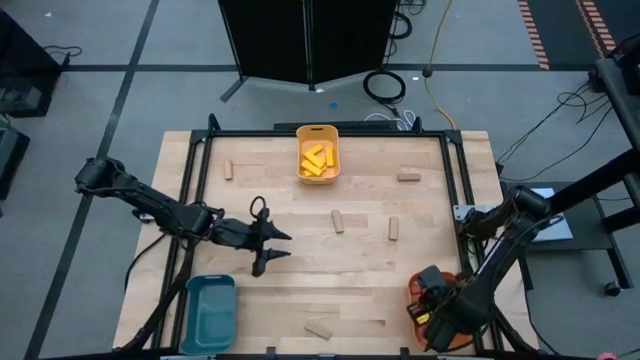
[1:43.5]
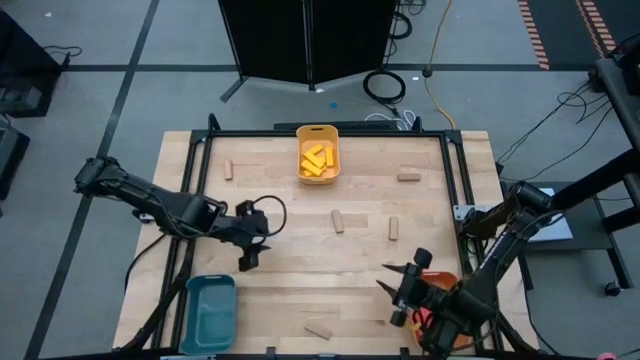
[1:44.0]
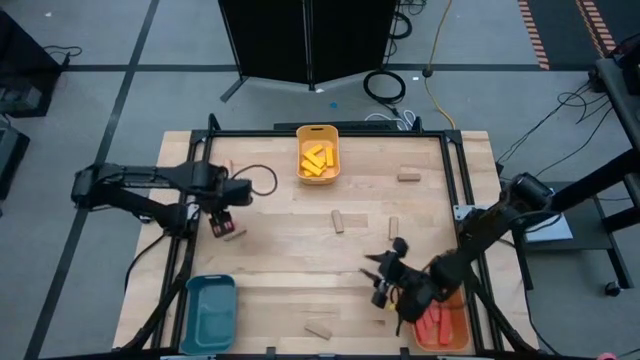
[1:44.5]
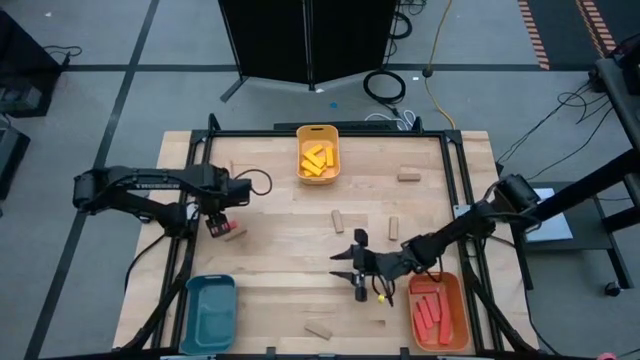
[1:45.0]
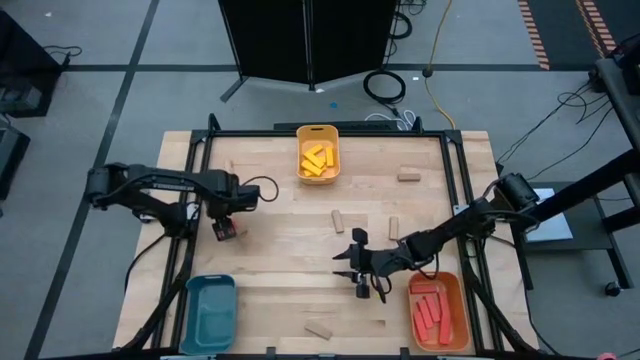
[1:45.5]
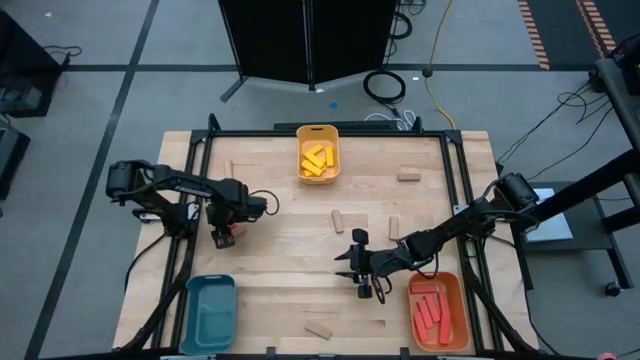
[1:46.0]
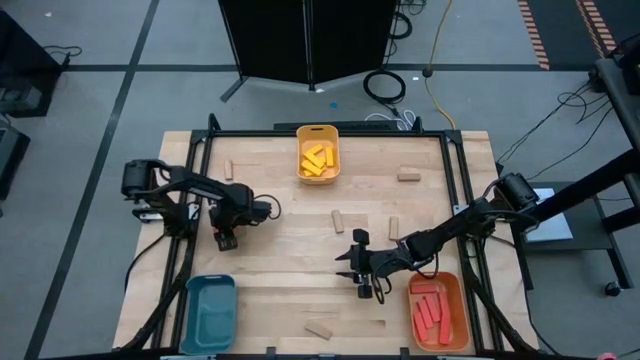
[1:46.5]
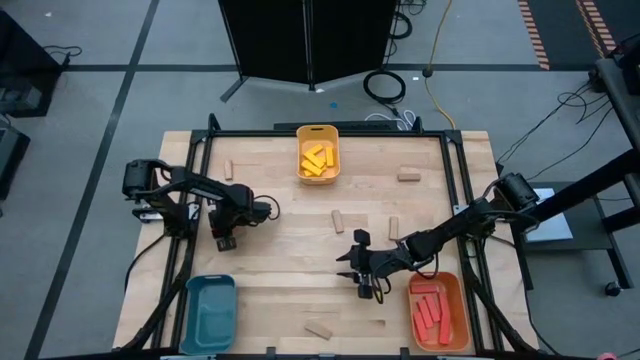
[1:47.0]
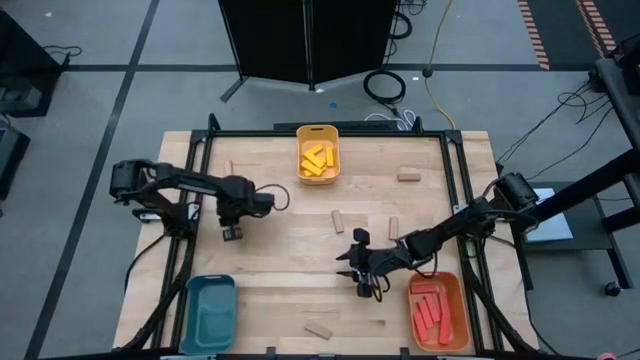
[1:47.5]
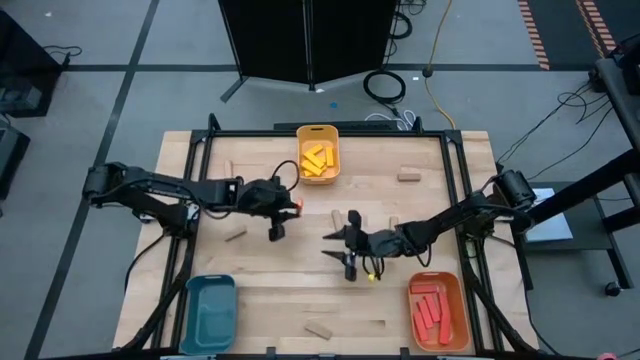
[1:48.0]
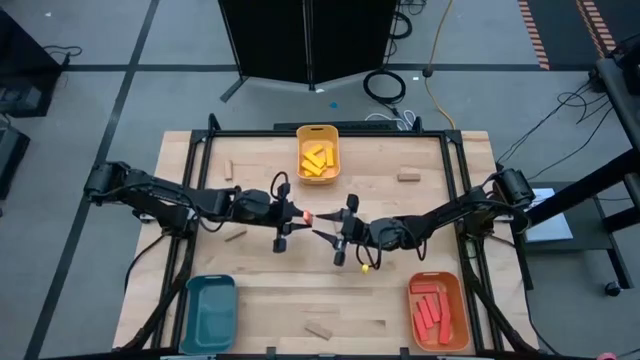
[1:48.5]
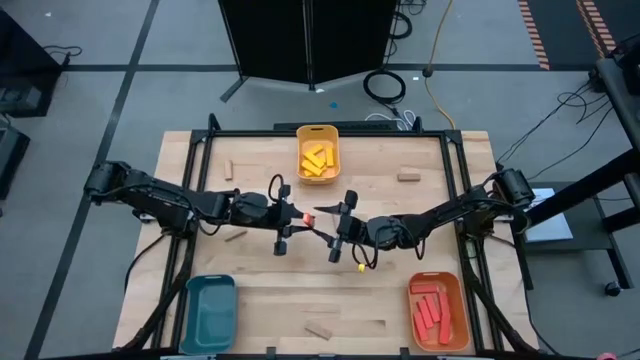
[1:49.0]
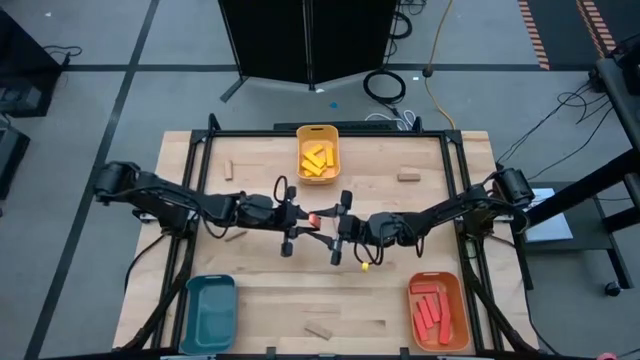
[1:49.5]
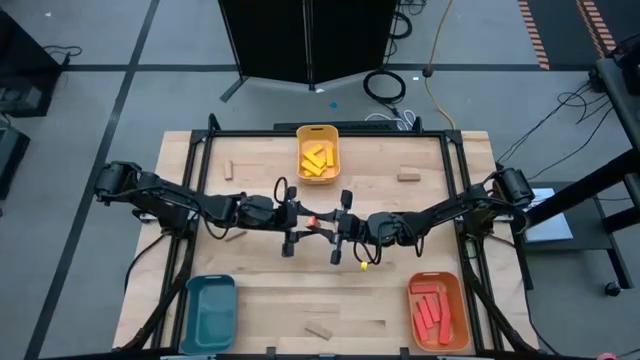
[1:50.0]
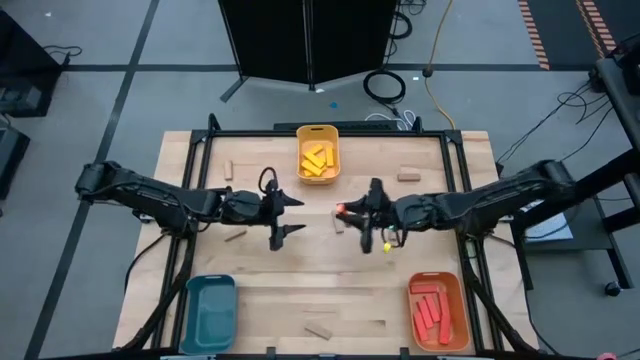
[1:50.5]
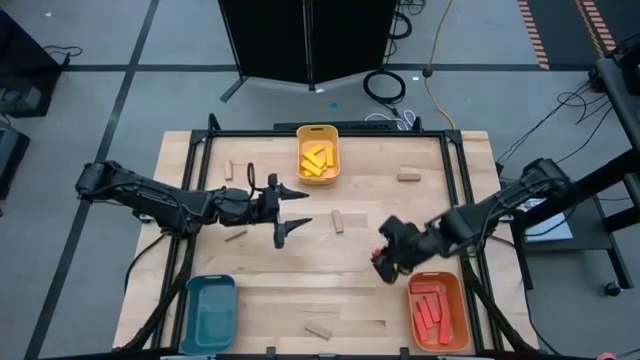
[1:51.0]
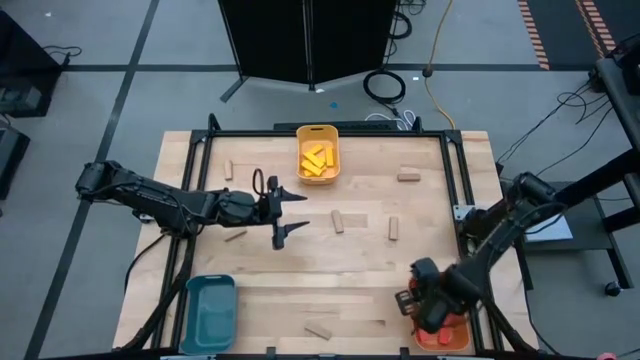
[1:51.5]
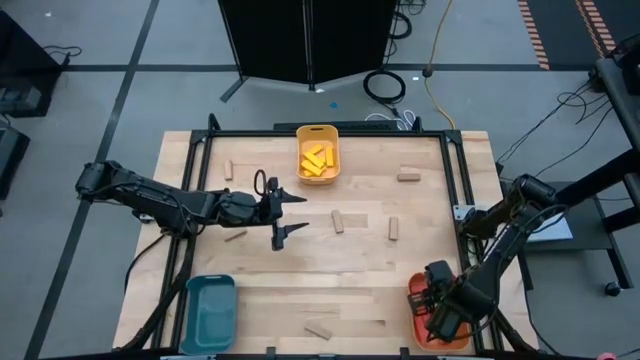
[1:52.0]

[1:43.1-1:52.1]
Task: Sort blocks
Put the orange block into the orange bin

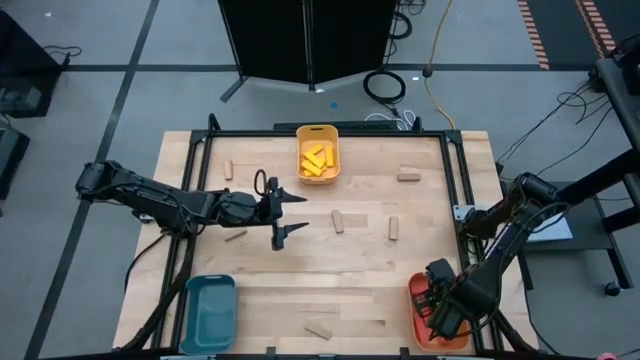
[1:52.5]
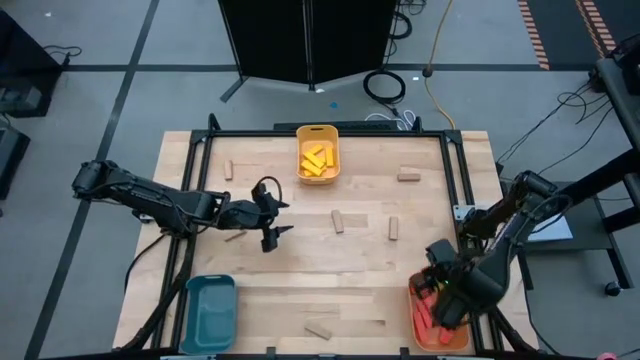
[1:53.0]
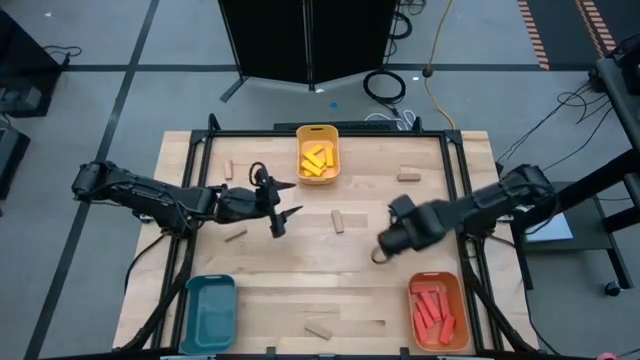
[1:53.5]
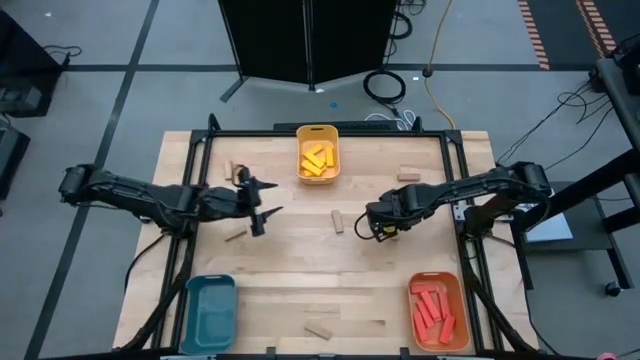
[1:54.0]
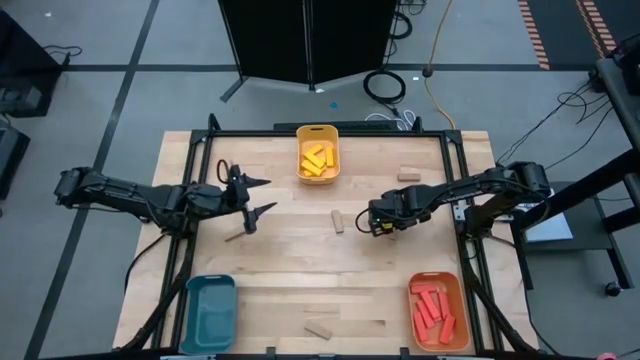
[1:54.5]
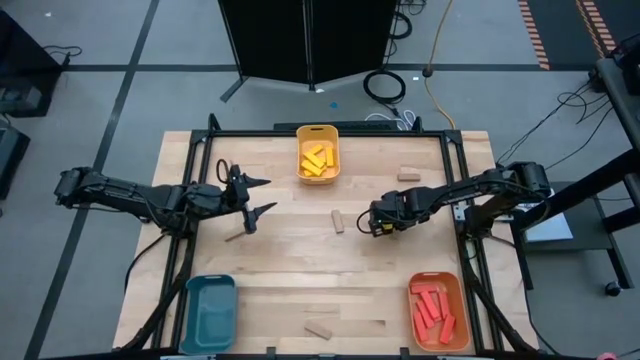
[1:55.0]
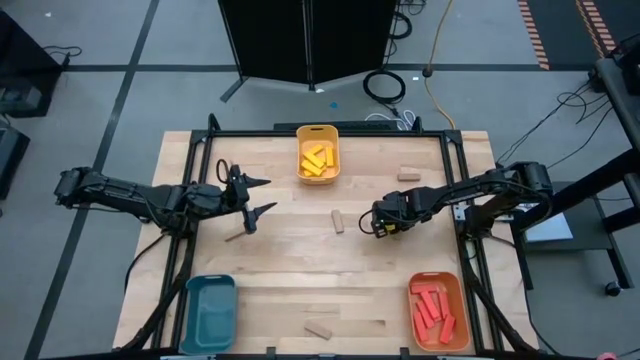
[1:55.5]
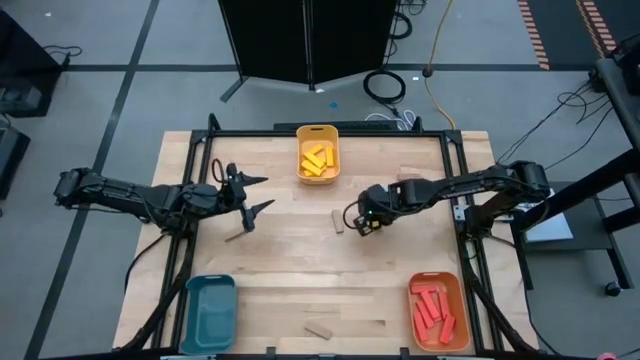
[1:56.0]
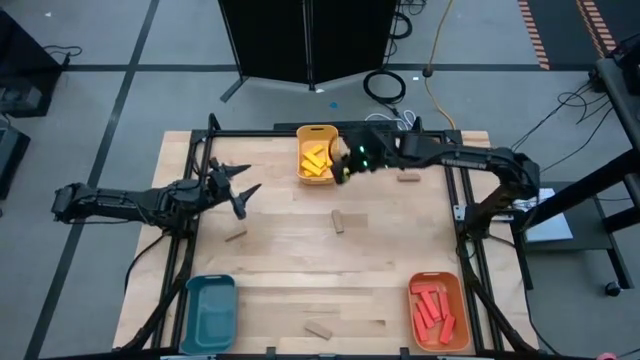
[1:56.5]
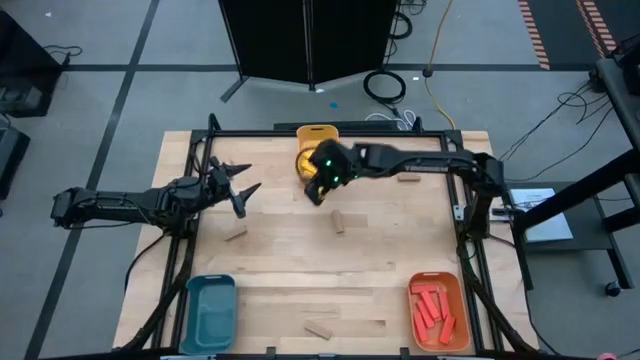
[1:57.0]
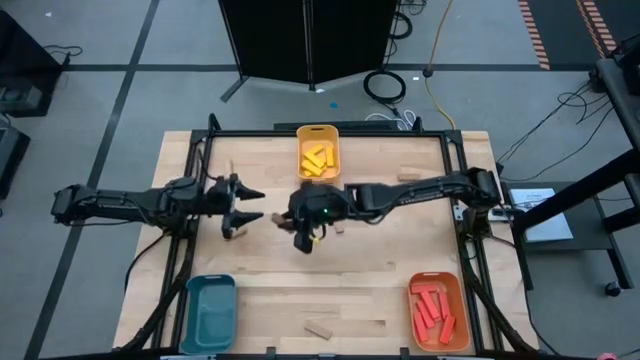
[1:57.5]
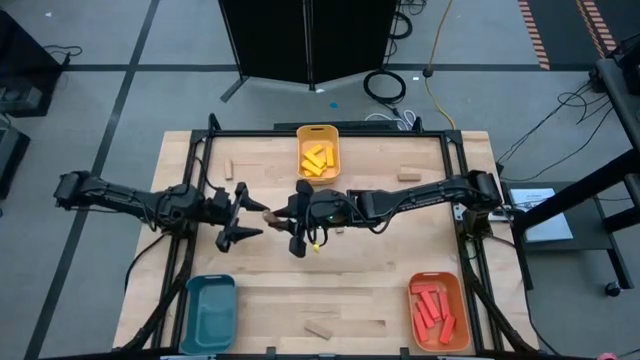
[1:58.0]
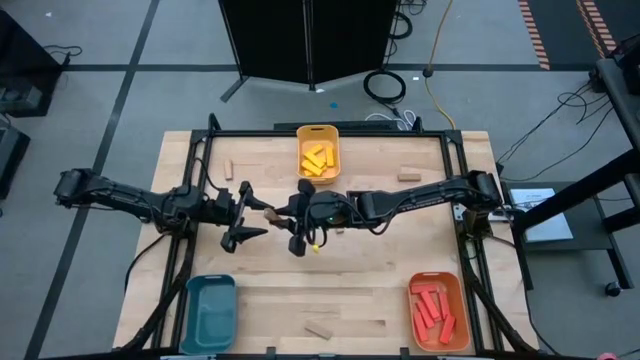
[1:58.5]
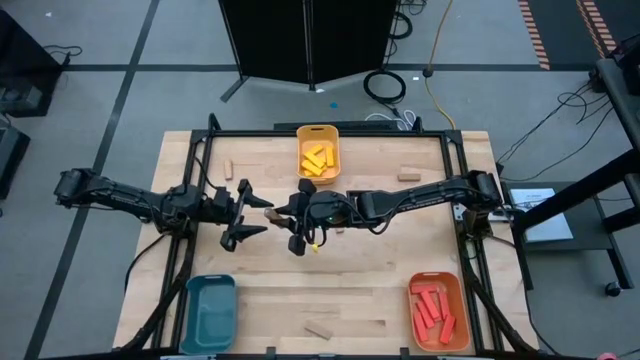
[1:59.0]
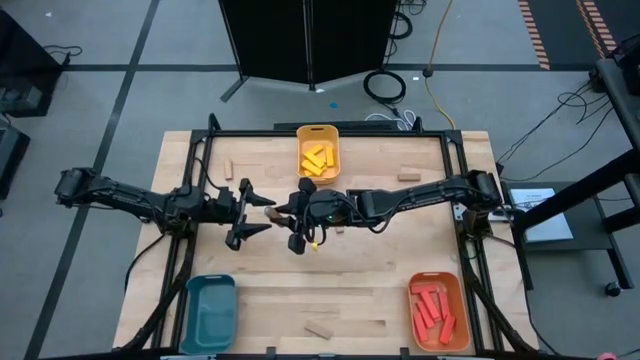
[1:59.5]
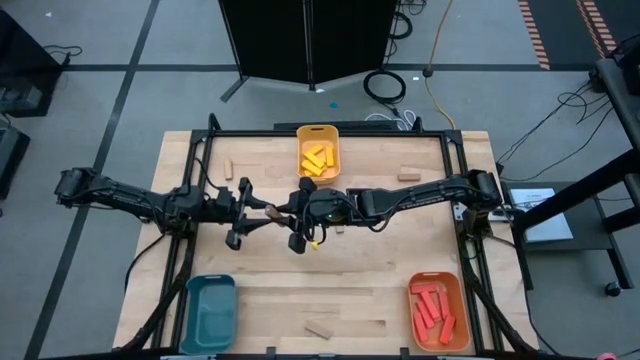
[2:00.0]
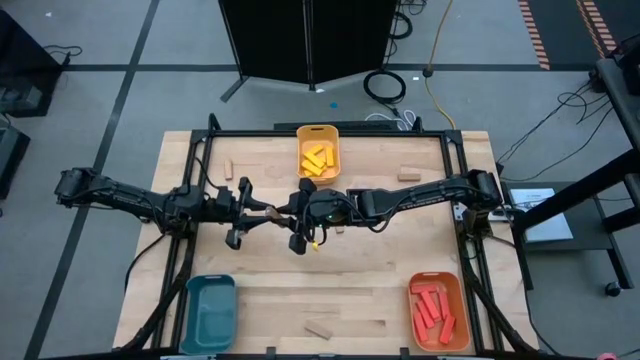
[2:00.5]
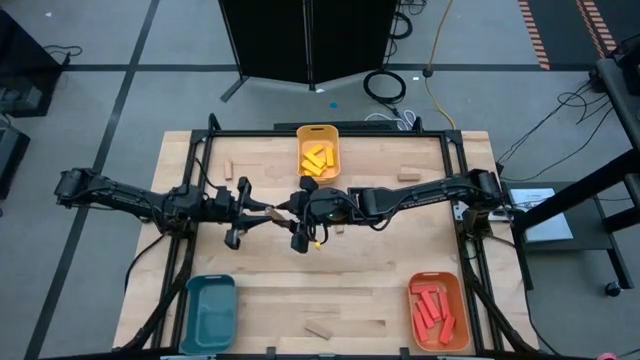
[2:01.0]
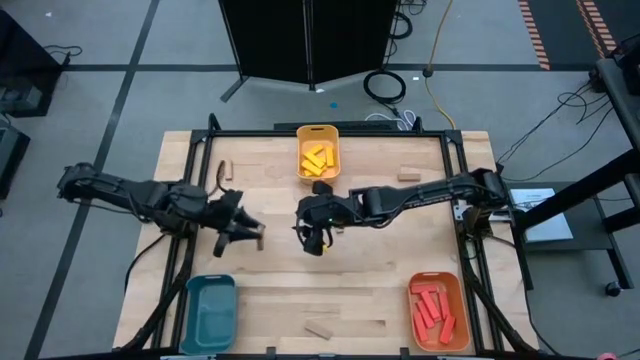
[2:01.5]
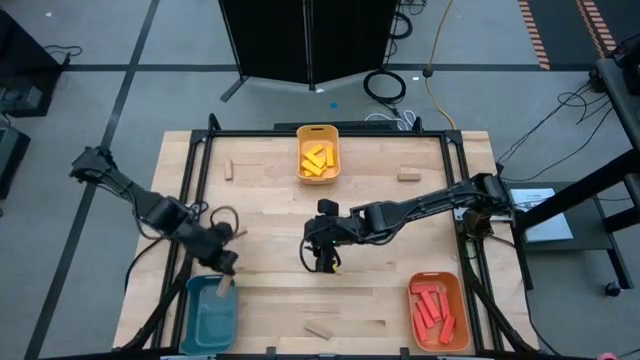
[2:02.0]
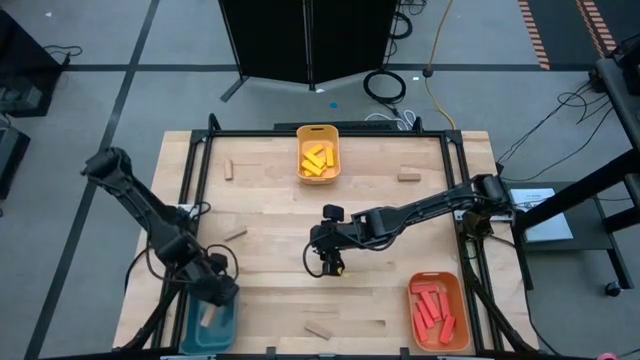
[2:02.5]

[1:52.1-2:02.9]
Put the brown block into the blue bin

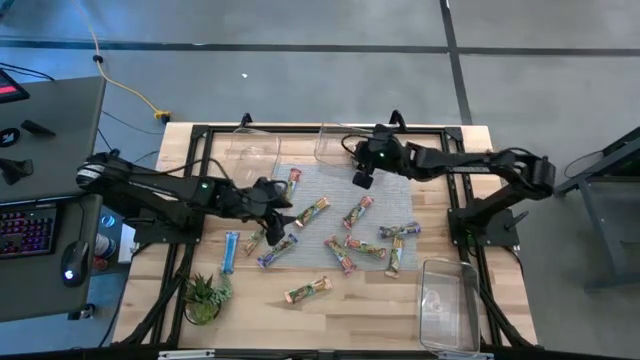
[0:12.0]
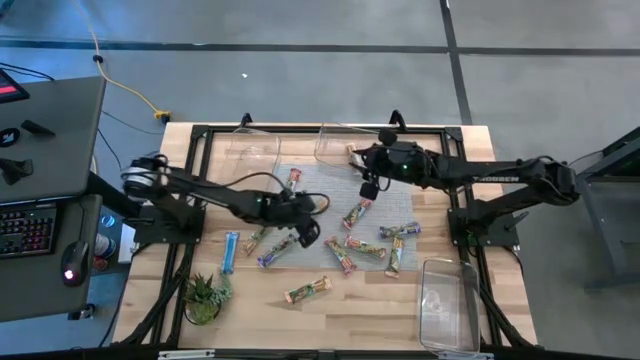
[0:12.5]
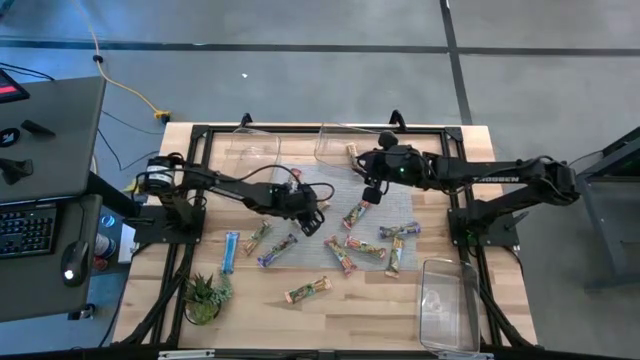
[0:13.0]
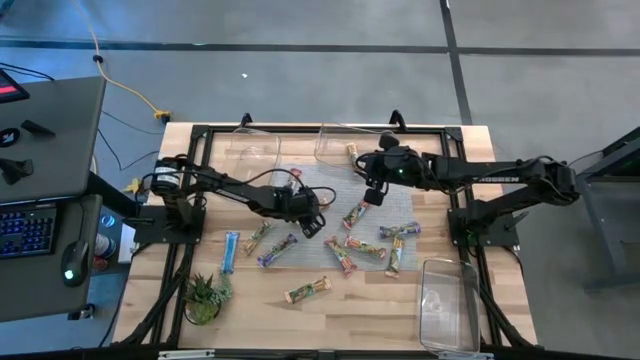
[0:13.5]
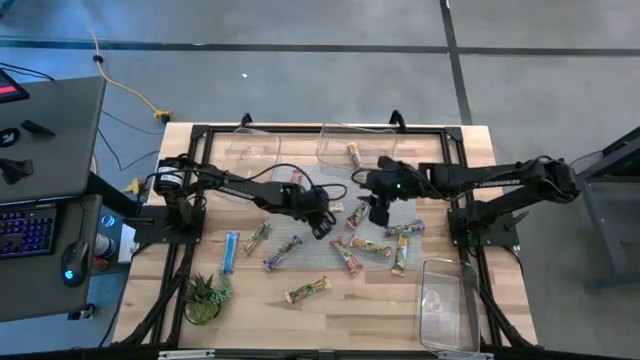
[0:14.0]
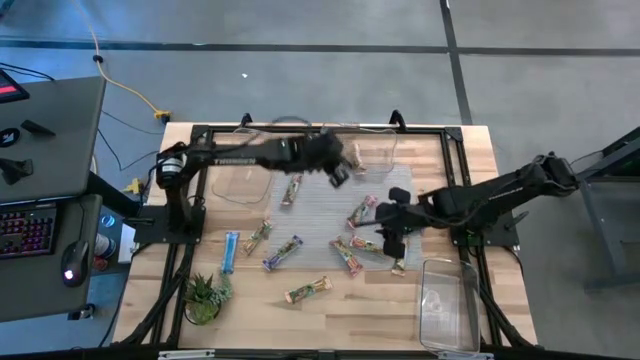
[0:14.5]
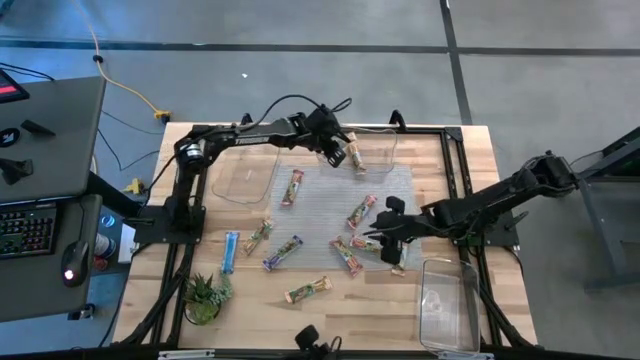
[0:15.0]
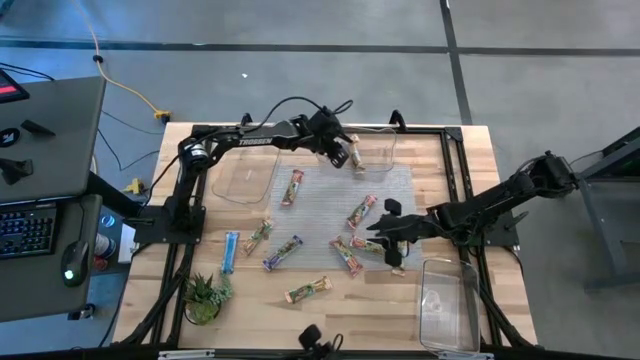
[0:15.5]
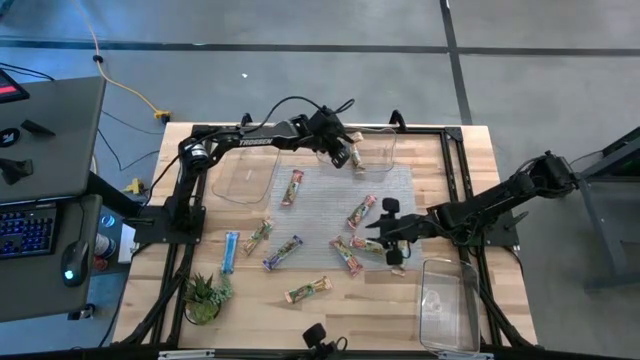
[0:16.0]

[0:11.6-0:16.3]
Task: Pick and place Granola Bars by type
Put the yellow granola bar into the top right transparent bin
